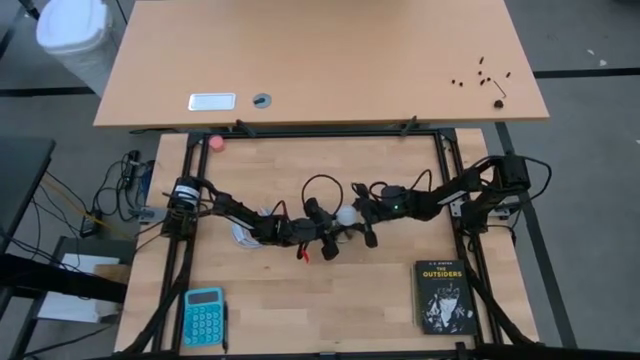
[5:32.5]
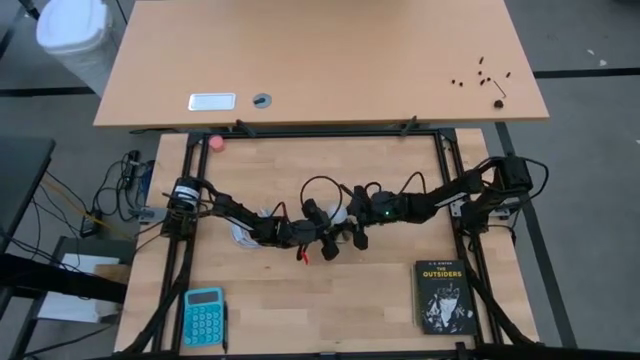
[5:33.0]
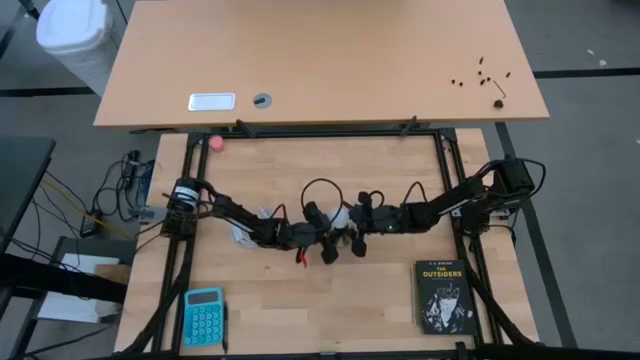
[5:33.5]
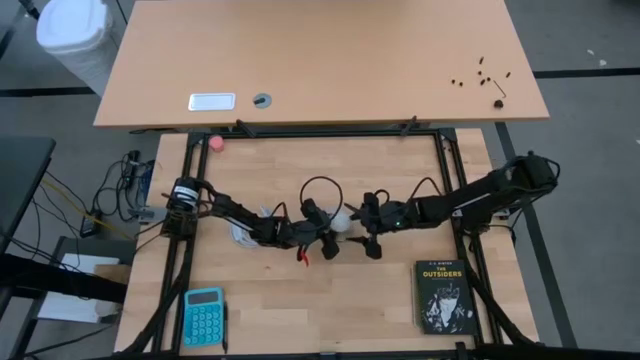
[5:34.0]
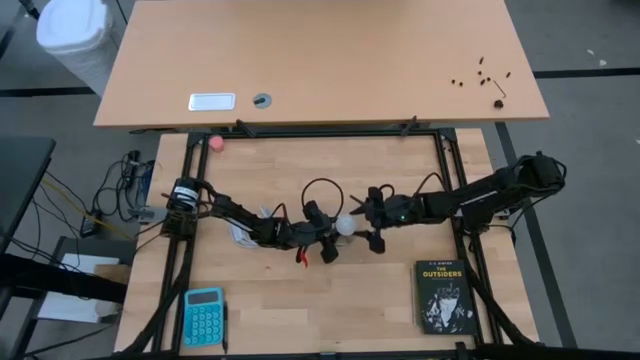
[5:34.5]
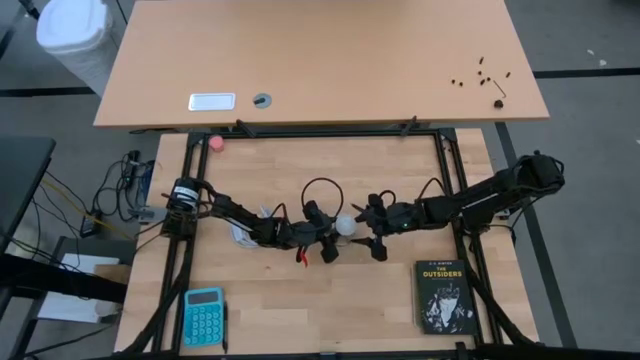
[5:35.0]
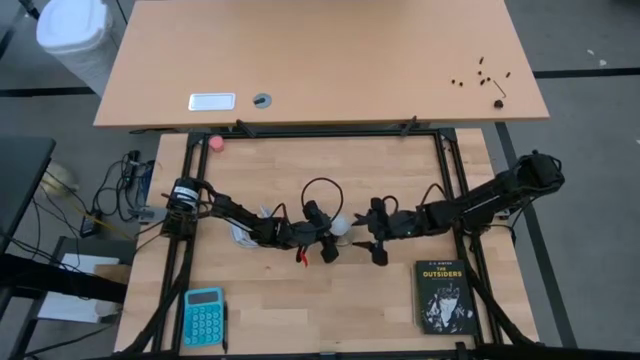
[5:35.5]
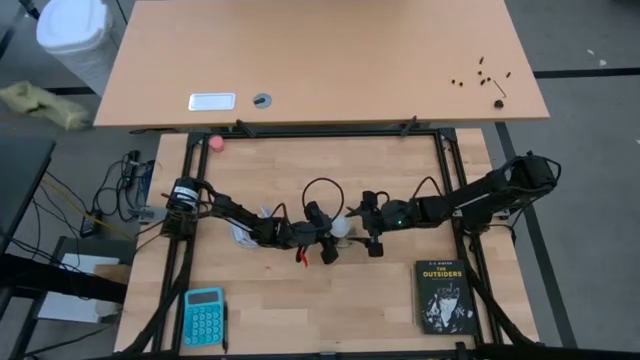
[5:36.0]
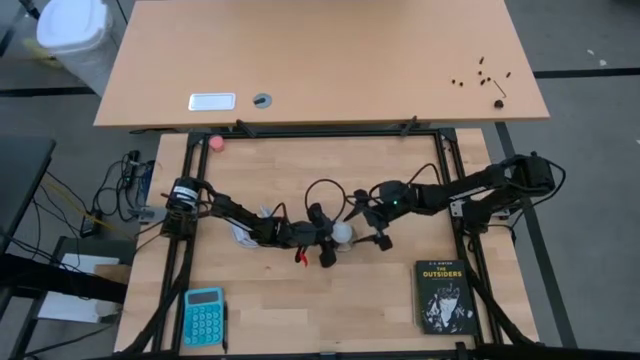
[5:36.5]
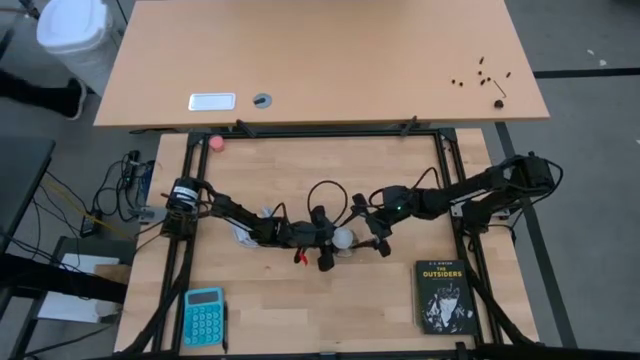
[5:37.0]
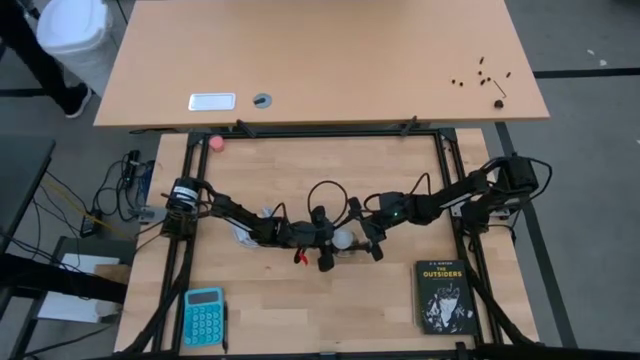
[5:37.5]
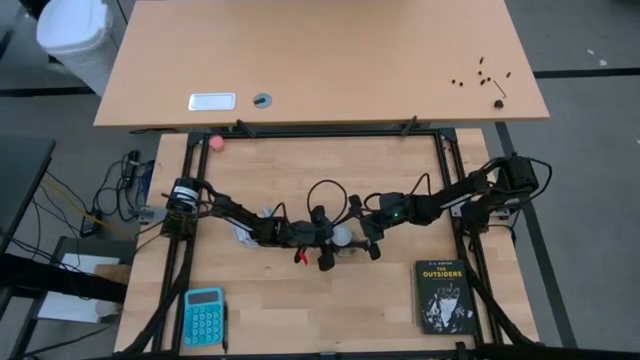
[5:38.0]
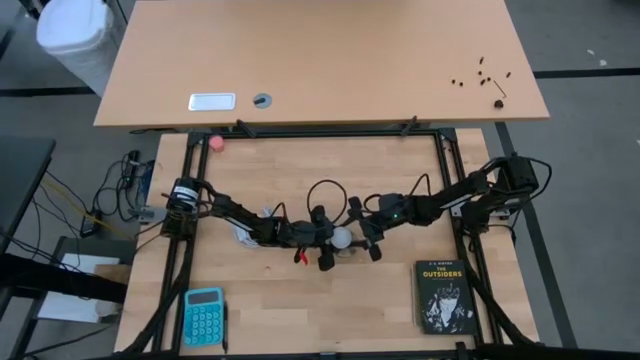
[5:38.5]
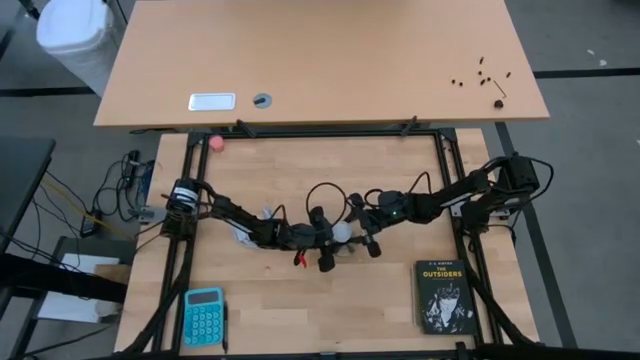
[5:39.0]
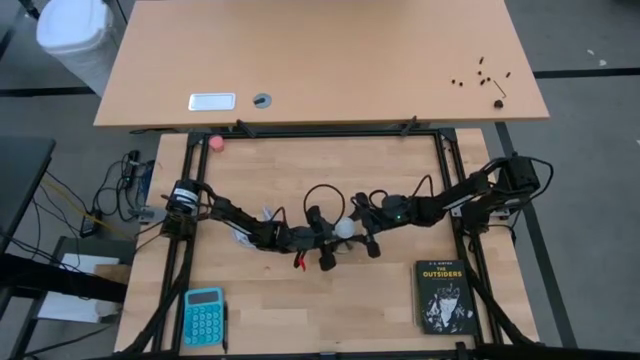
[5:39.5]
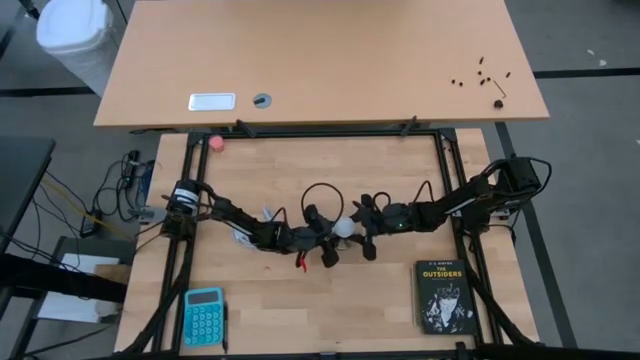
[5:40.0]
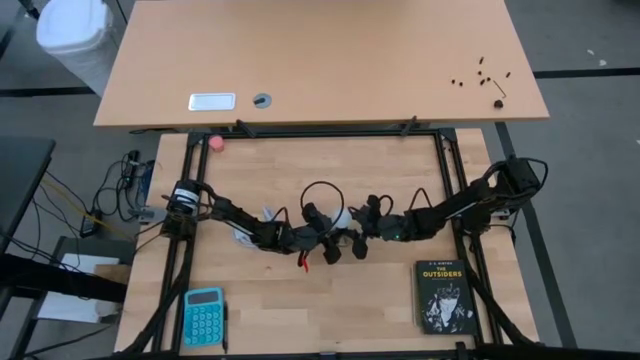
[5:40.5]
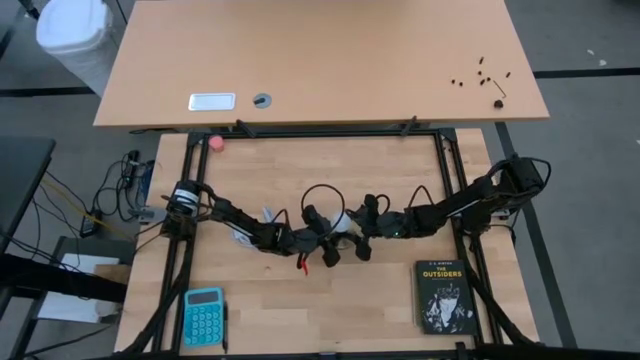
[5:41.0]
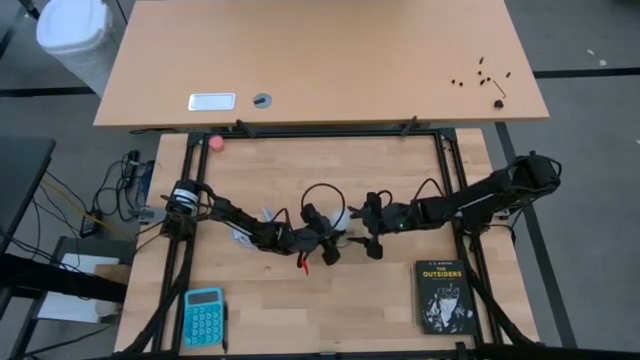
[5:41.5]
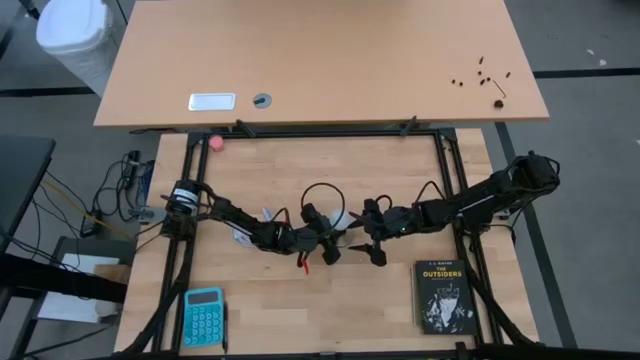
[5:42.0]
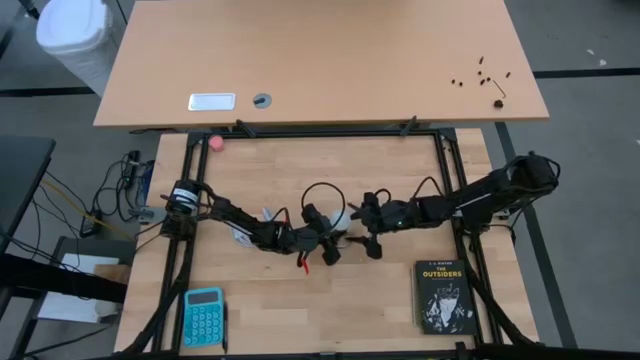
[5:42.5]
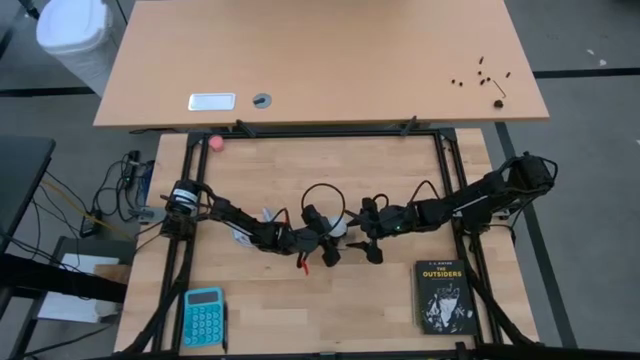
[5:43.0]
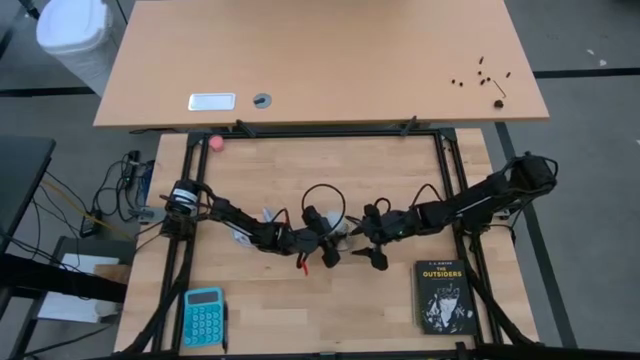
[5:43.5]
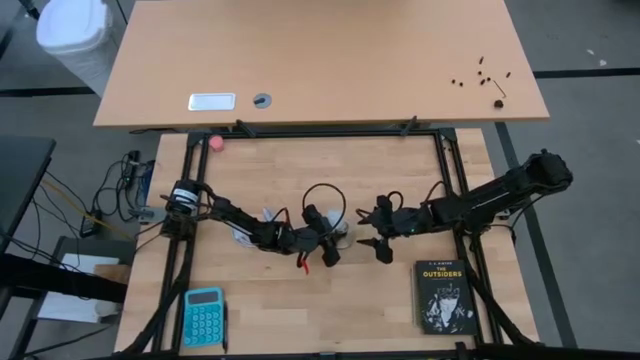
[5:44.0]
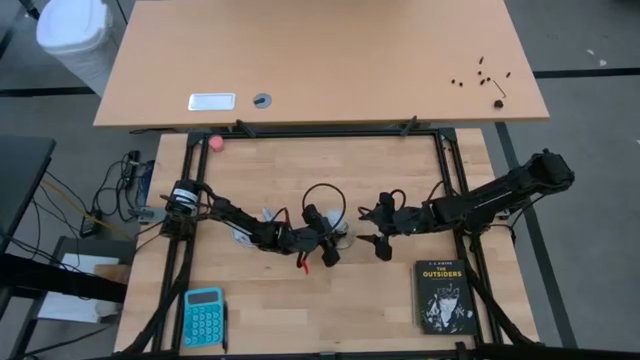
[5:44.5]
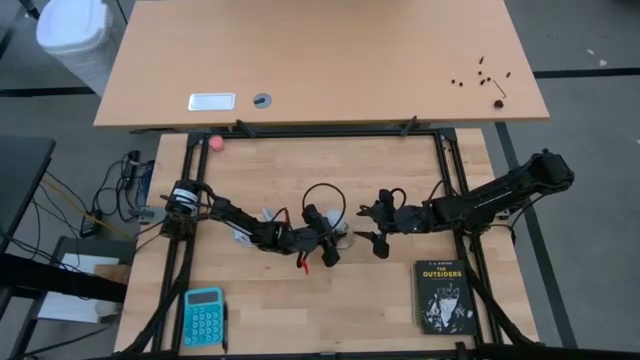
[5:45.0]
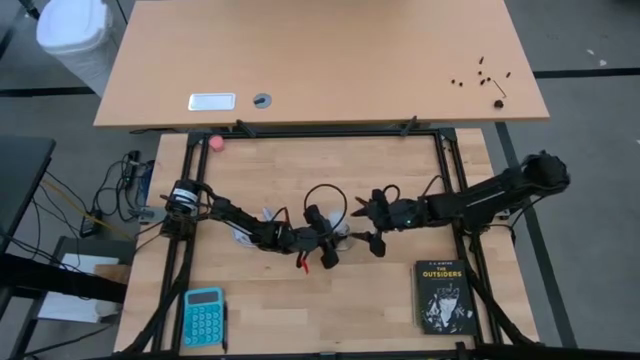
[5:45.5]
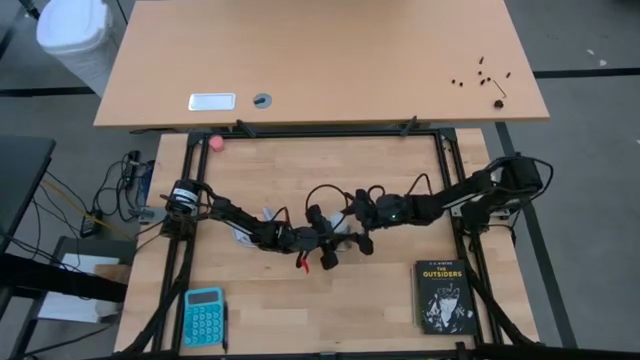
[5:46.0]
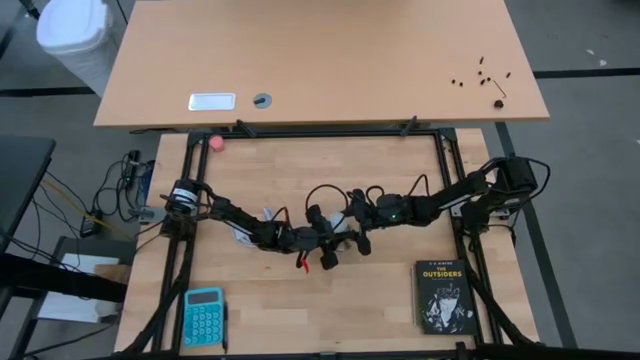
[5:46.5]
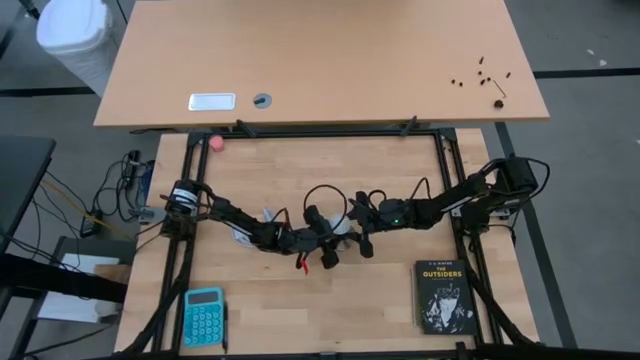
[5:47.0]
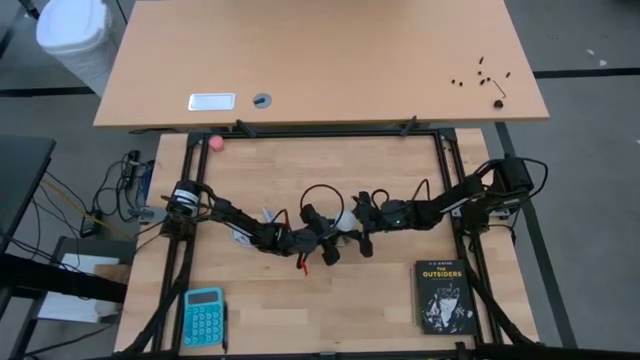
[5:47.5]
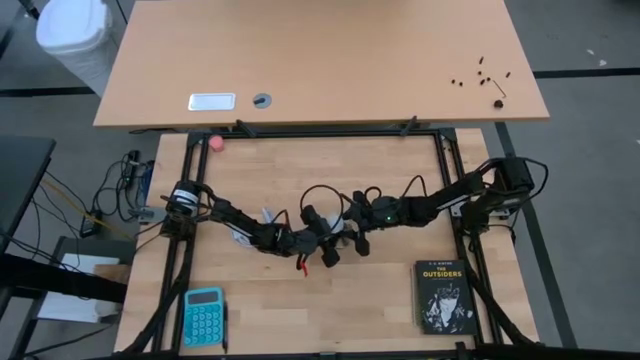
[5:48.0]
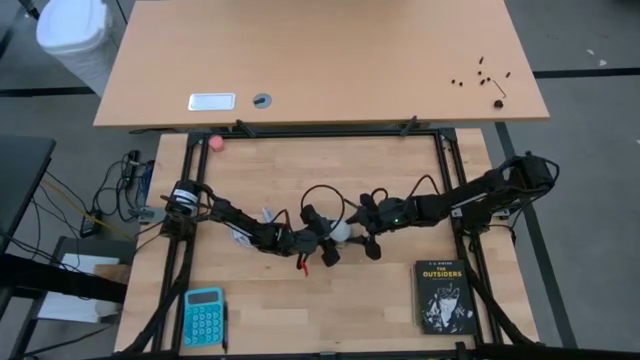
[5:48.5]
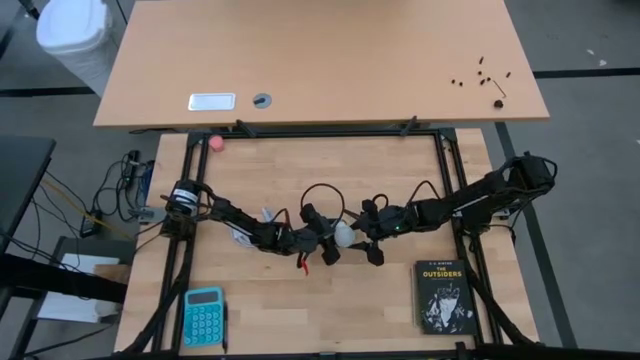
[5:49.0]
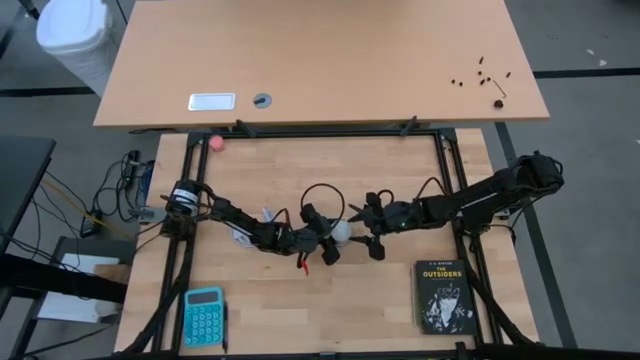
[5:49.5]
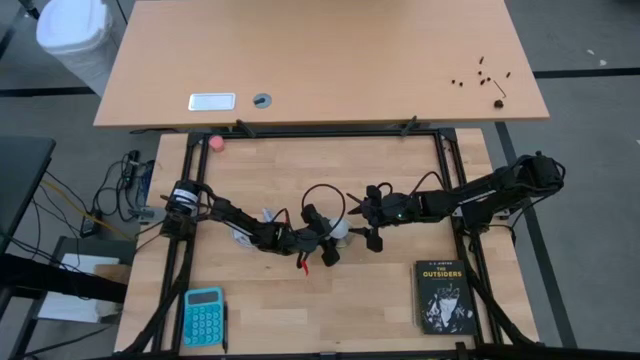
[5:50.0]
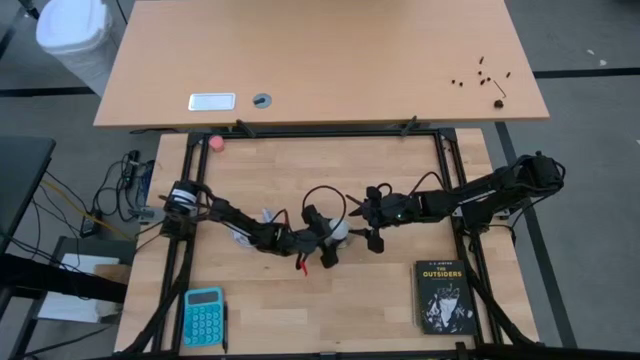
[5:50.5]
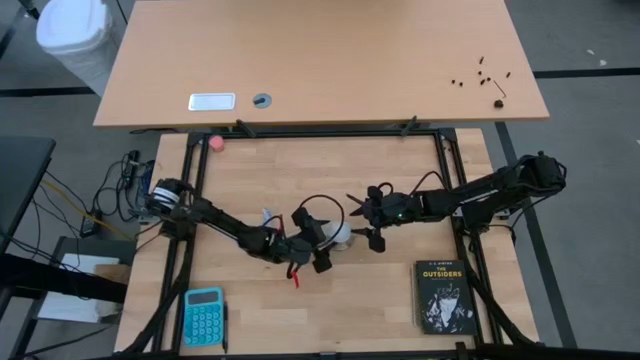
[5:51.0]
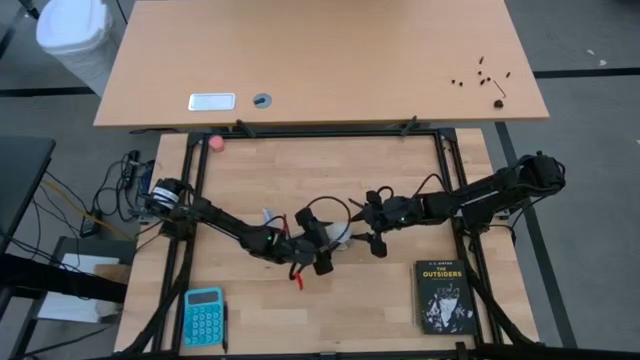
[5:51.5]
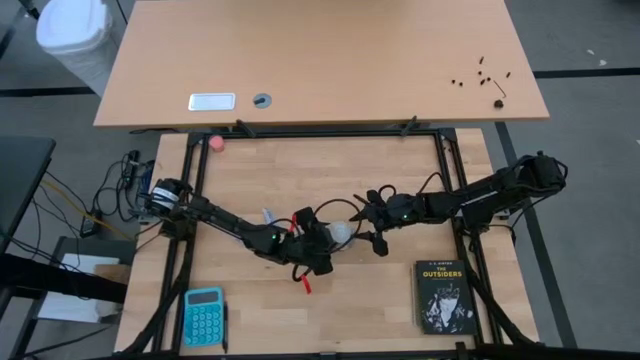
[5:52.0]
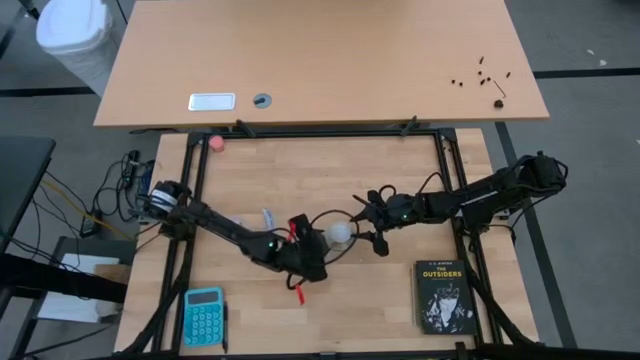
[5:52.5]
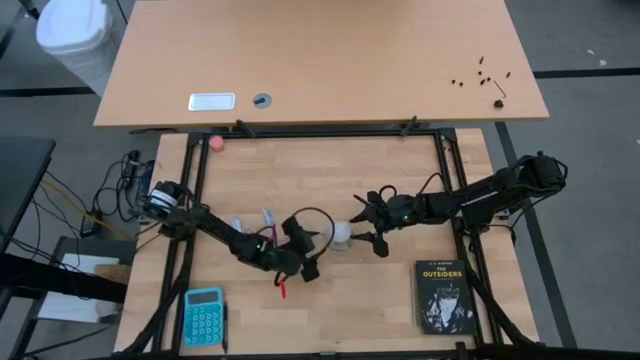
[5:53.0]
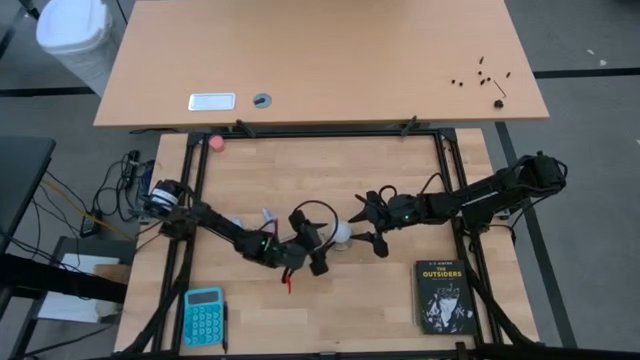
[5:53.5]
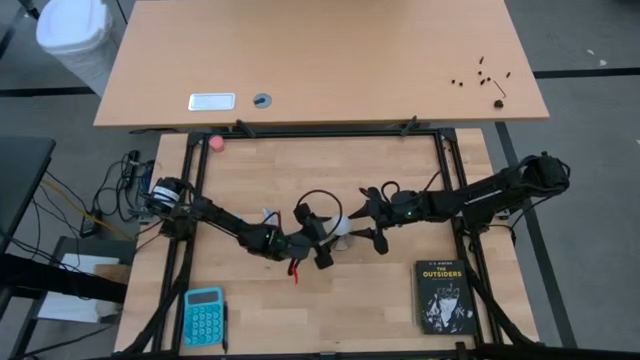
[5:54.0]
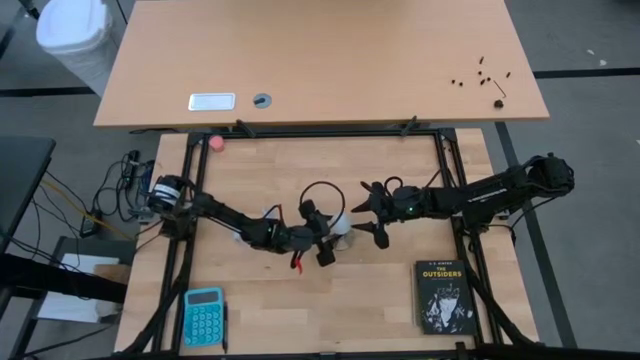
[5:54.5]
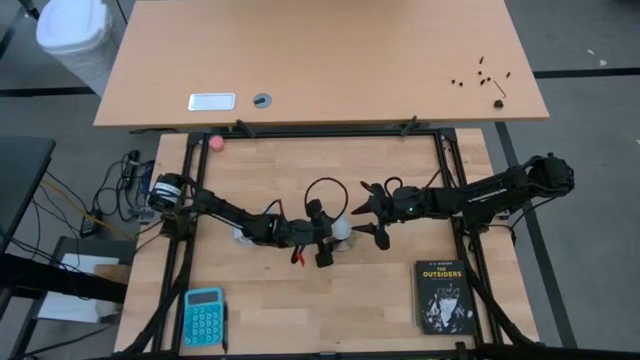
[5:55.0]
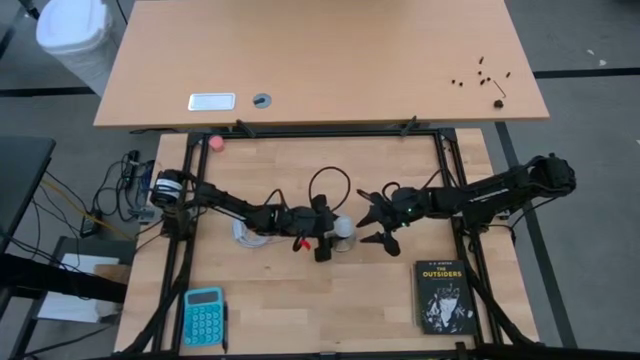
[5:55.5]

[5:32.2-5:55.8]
Task: Screw lightbulb
Insert the white lightbulb into the silver lamp
